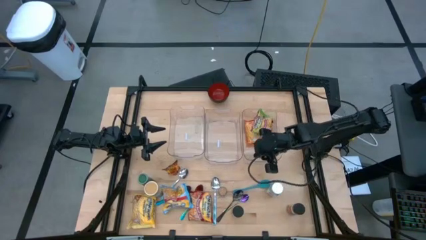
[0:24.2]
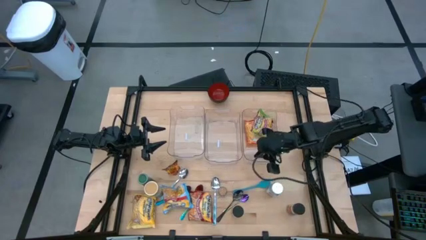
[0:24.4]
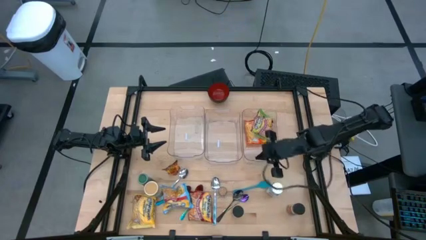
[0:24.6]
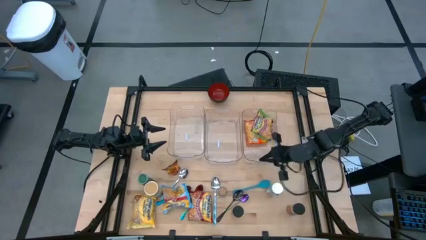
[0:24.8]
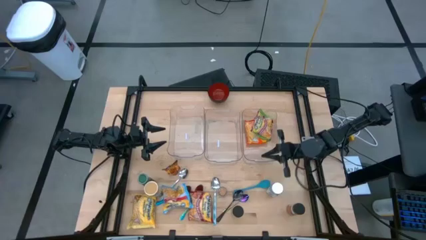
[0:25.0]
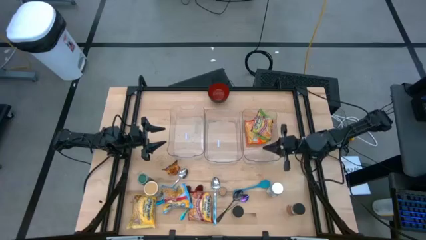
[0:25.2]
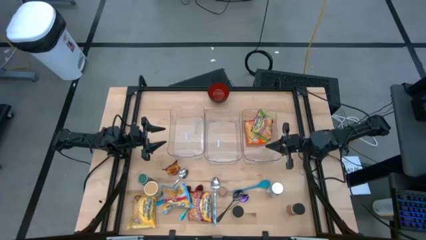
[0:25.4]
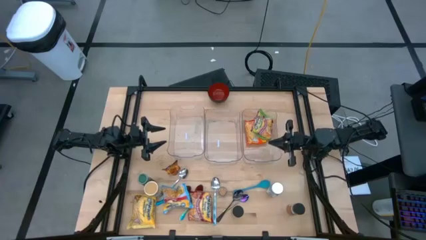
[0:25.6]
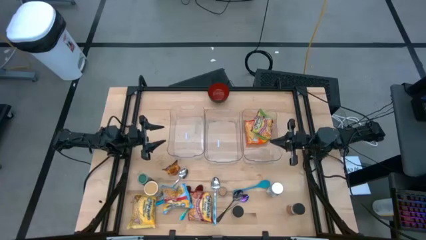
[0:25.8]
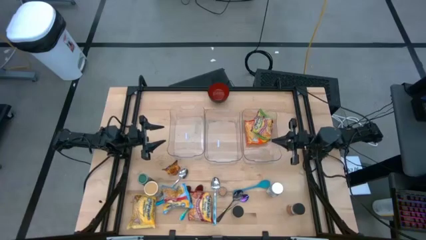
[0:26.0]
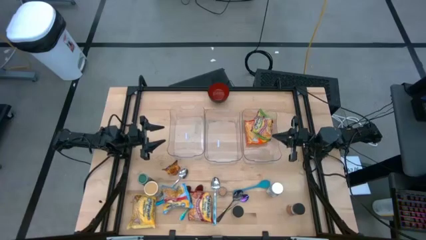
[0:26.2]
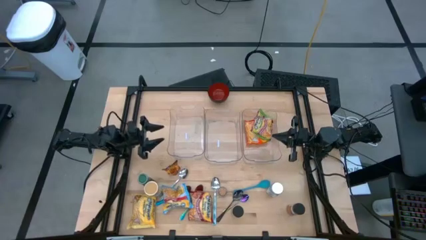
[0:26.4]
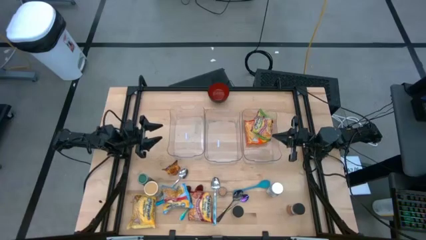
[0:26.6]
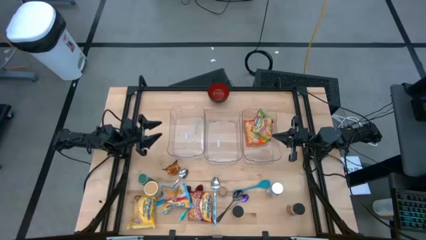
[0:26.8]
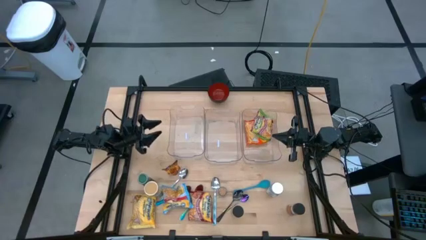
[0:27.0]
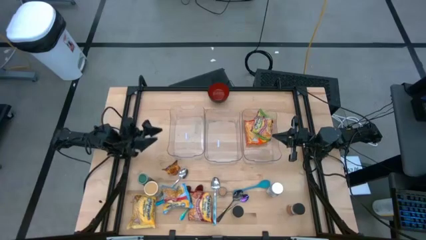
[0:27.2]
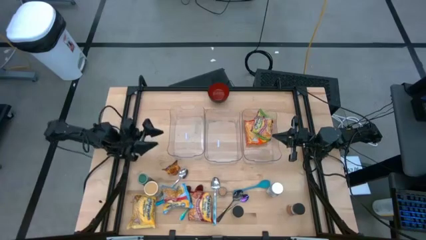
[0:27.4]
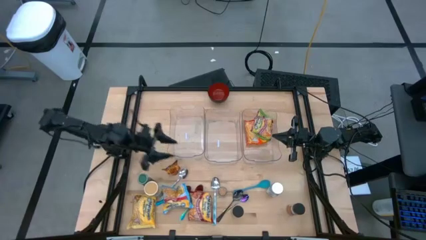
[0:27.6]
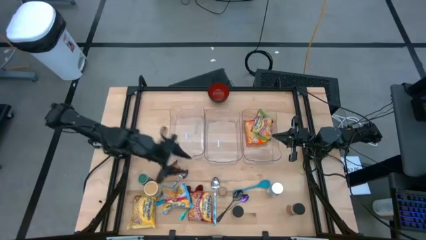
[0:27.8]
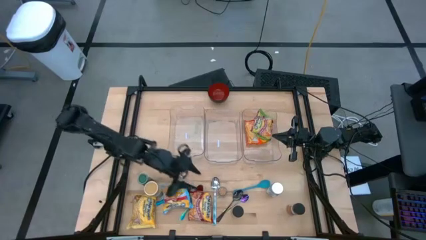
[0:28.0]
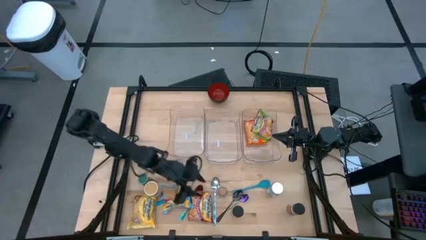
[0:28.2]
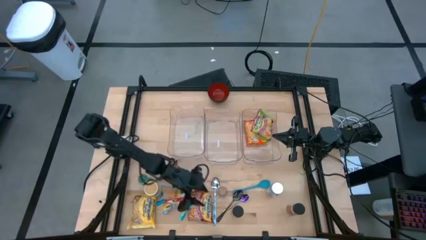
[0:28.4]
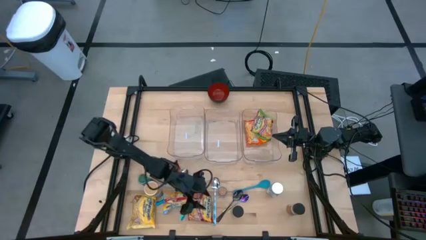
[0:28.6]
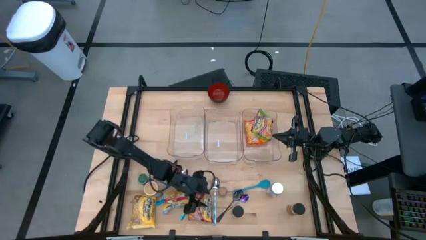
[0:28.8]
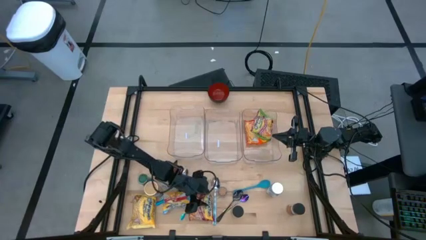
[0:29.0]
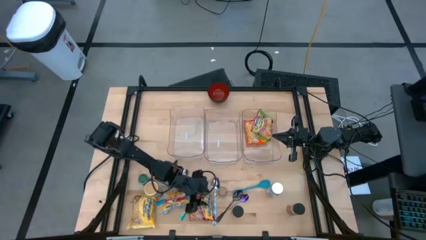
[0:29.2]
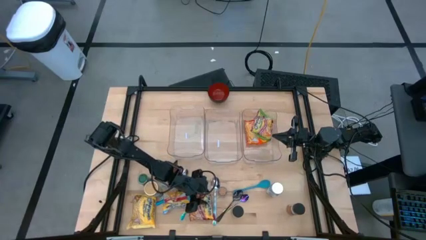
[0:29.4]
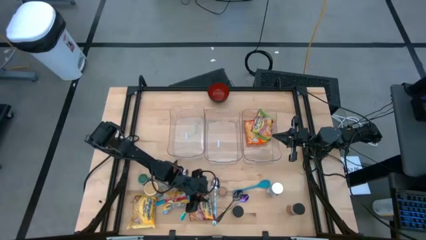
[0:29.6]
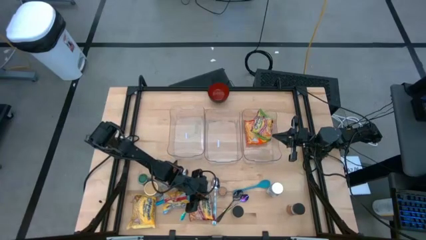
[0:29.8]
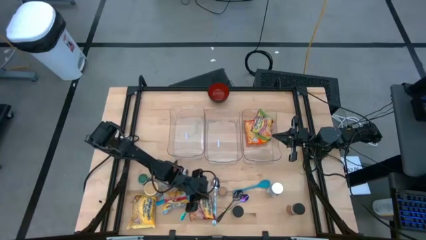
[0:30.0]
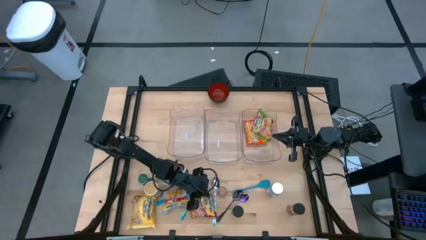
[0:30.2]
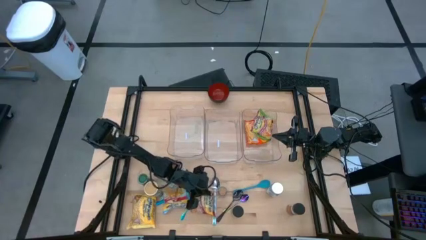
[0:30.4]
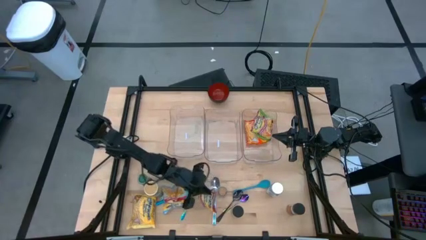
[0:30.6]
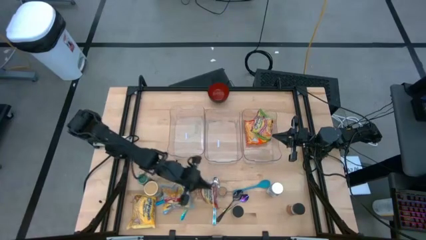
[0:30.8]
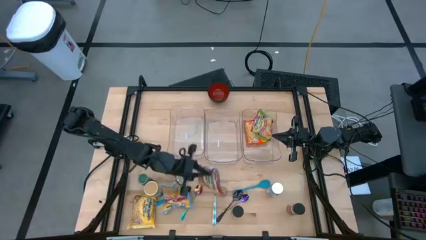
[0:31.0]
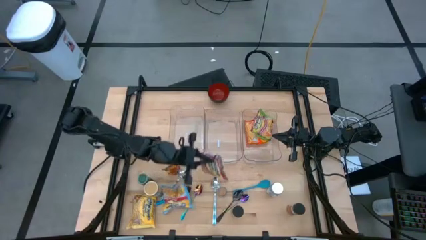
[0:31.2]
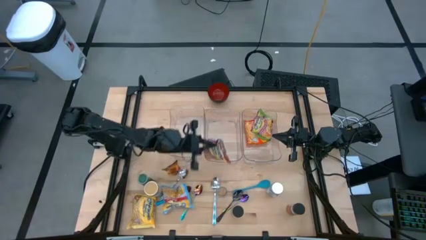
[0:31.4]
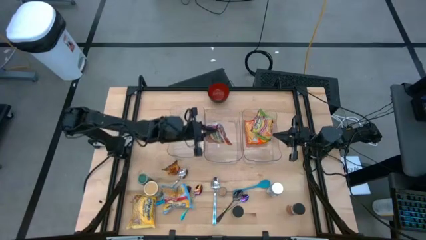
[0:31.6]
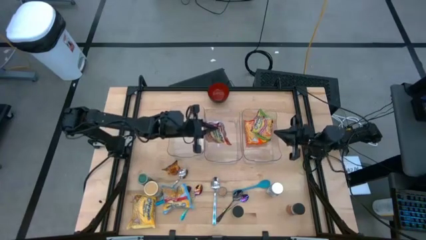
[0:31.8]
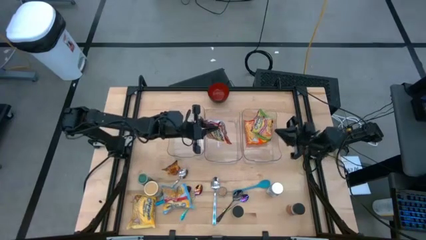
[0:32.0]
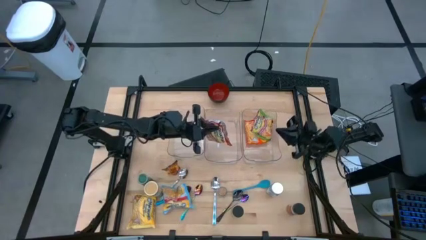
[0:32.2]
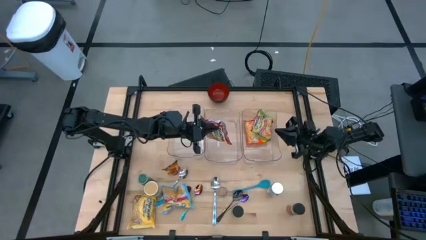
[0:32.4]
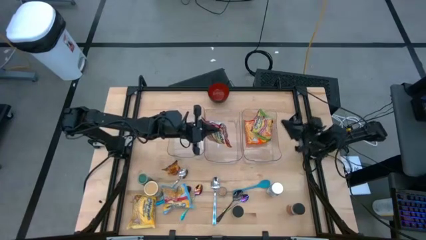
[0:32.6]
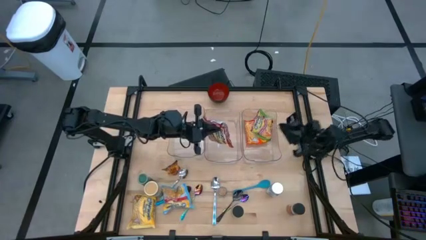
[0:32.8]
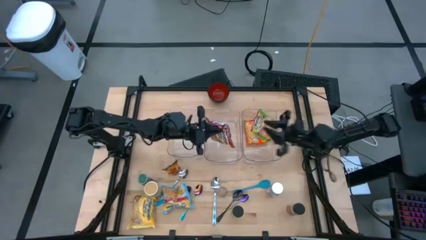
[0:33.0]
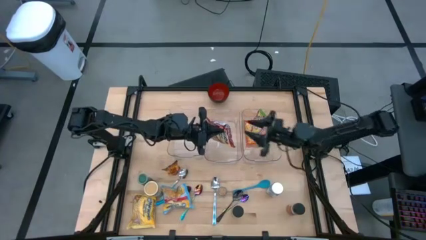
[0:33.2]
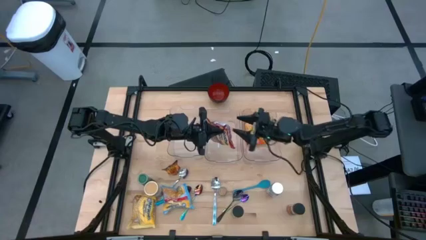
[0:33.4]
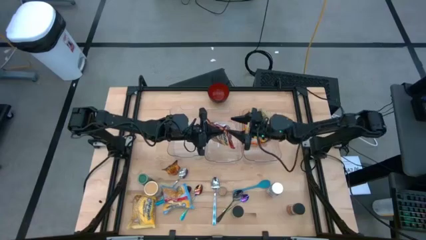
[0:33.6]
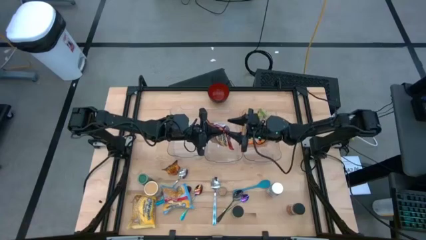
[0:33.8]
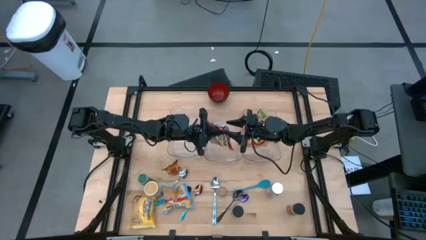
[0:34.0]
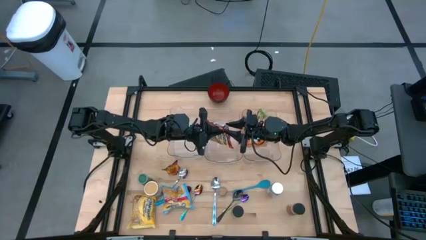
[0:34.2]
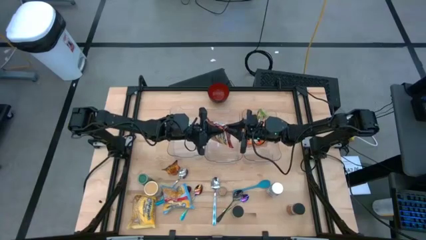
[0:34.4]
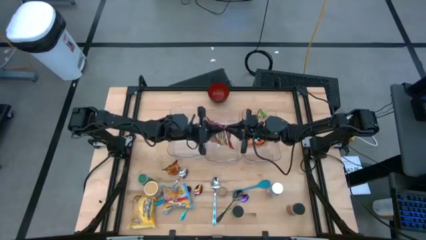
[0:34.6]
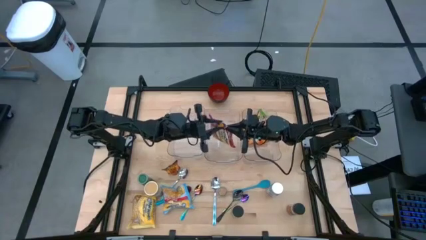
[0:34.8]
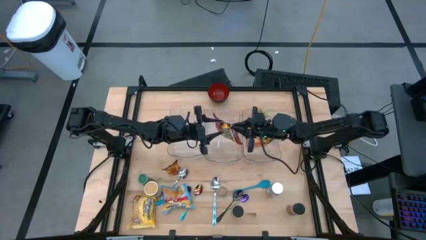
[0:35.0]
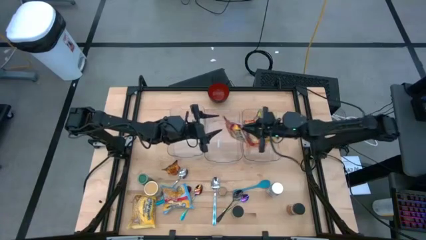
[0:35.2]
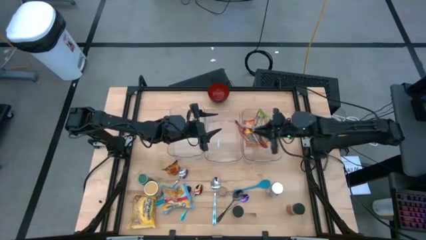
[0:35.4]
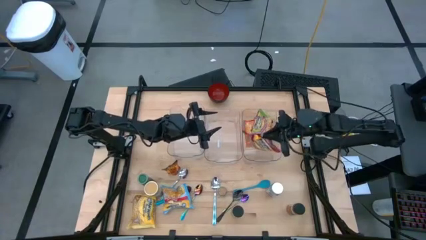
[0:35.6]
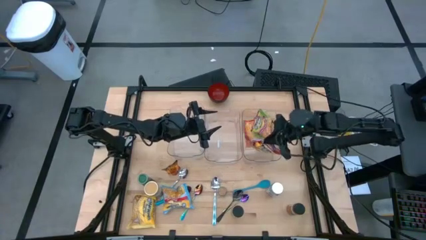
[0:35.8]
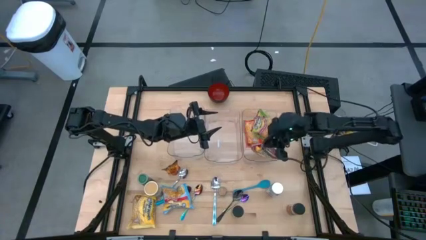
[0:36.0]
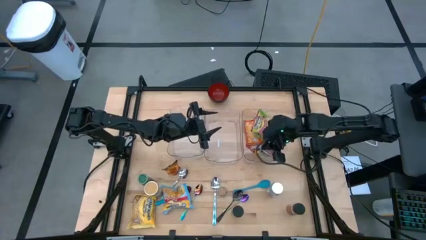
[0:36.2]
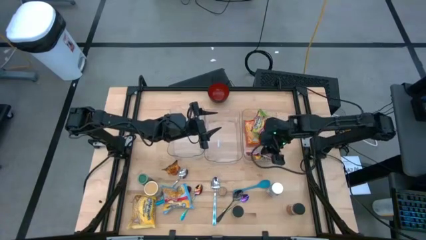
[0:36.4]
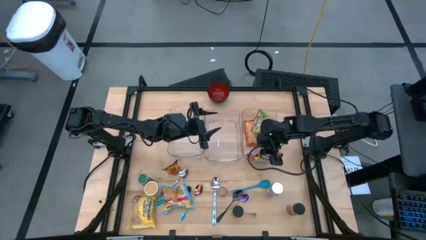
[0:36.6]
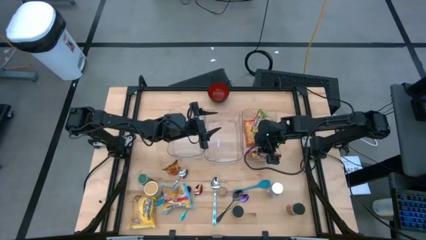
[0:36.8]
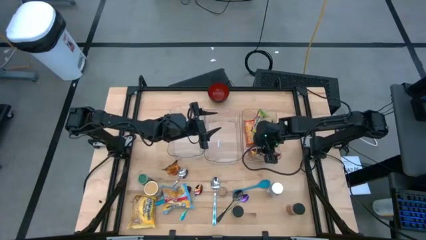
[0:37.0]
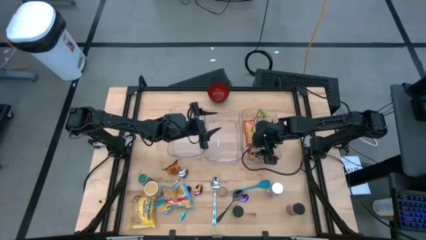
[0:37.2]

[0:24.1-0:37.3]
Task: Pick & Place Food Item
Put the red noodle pack into the right transparent bin
